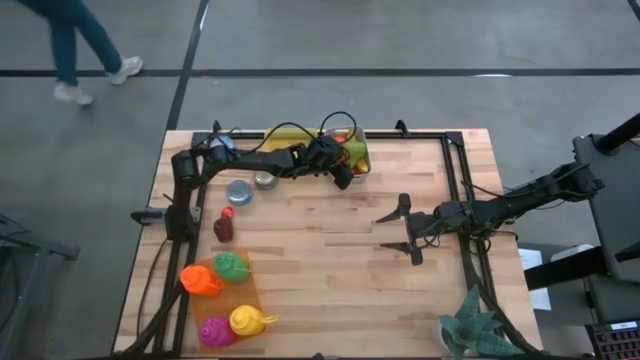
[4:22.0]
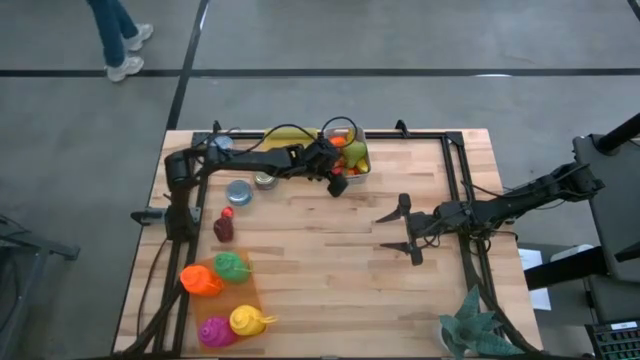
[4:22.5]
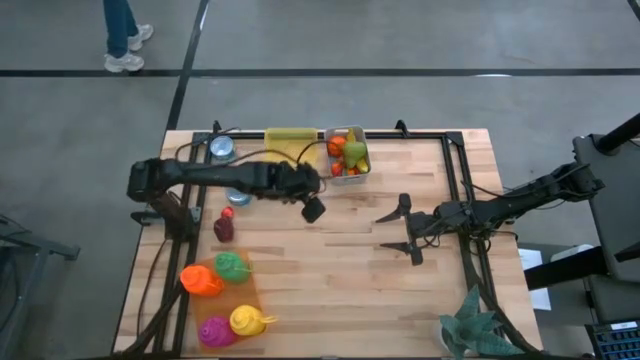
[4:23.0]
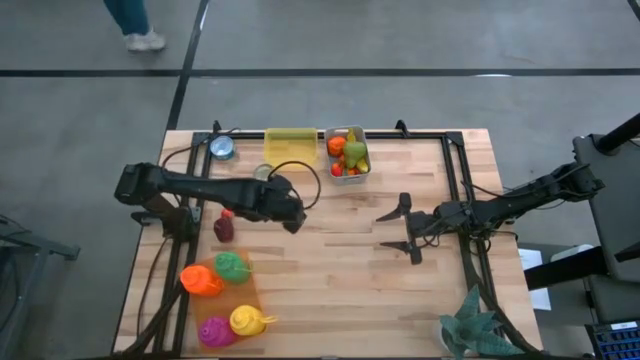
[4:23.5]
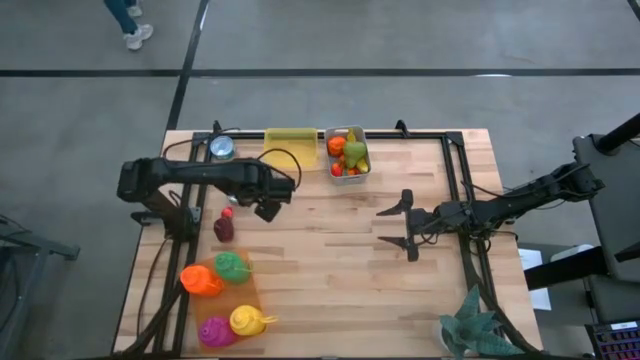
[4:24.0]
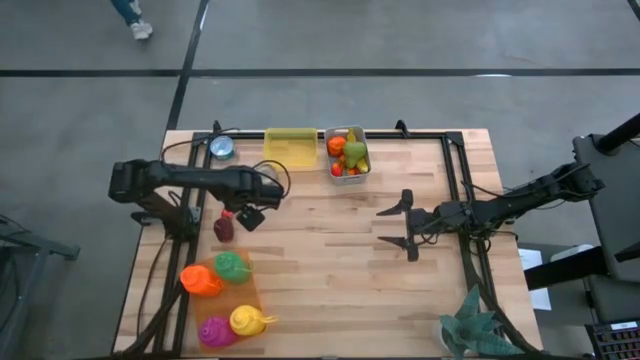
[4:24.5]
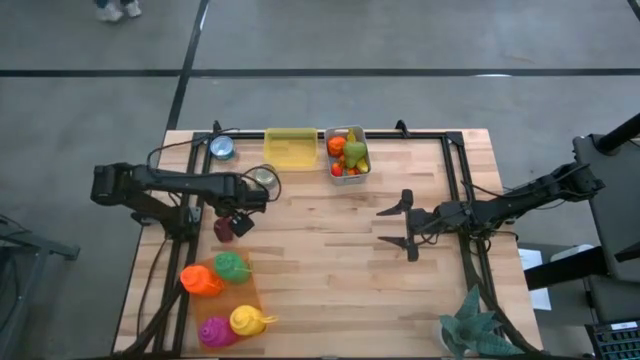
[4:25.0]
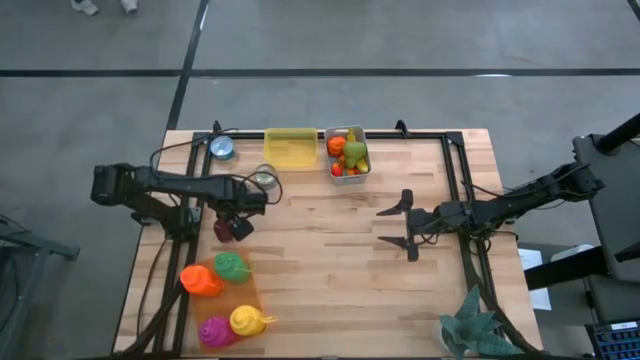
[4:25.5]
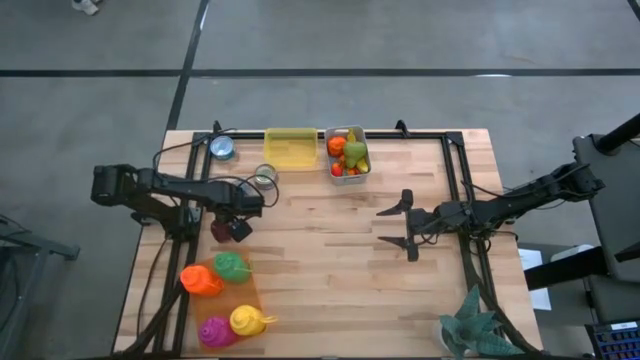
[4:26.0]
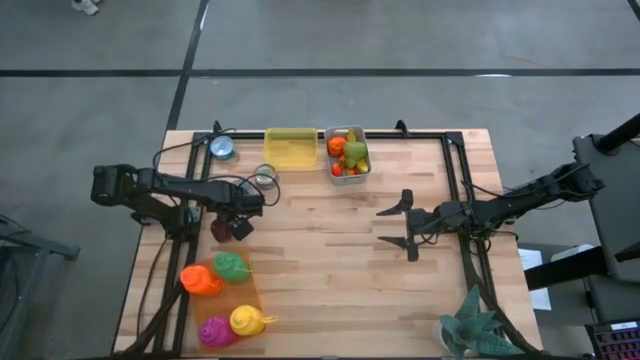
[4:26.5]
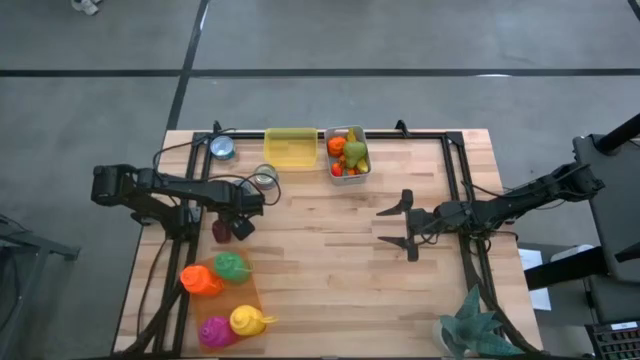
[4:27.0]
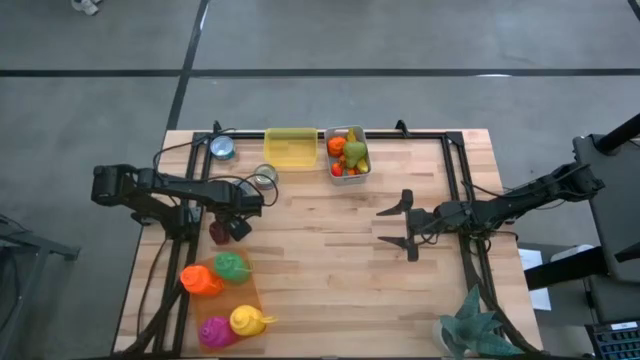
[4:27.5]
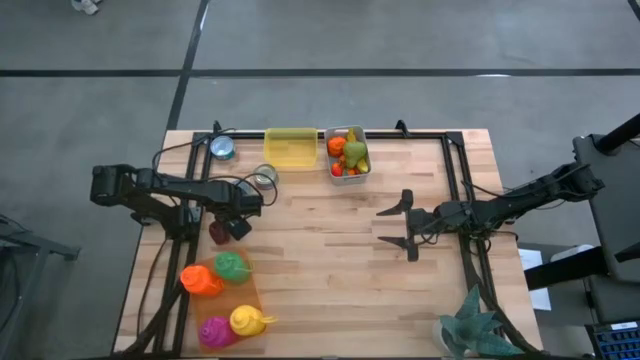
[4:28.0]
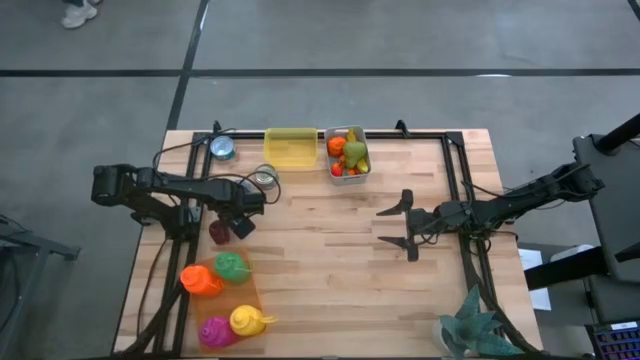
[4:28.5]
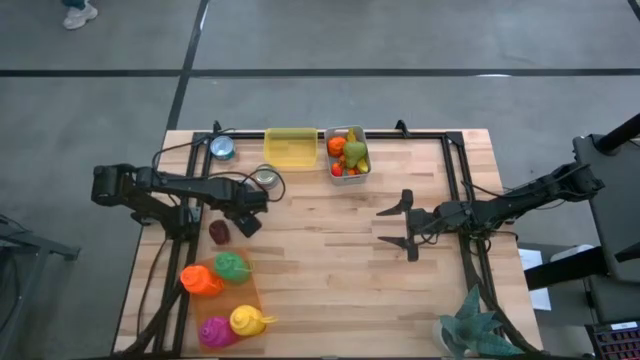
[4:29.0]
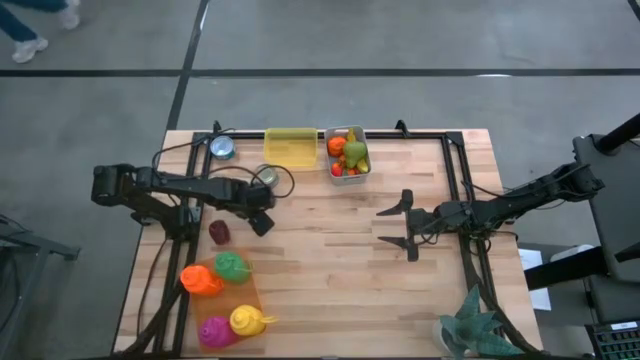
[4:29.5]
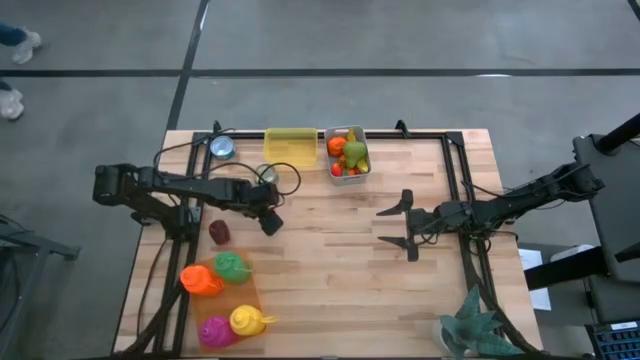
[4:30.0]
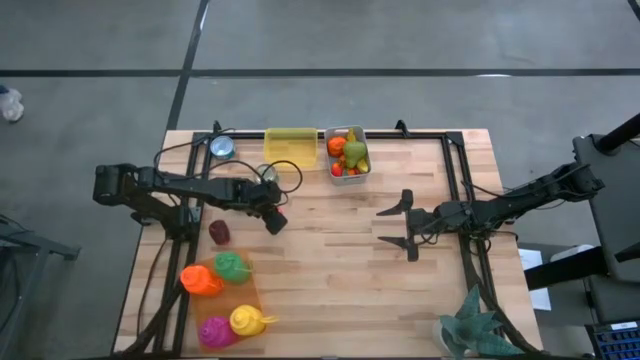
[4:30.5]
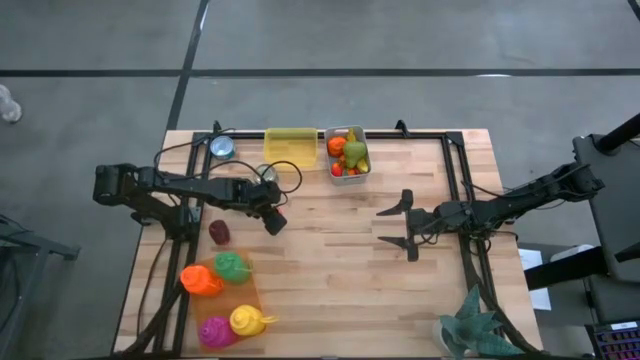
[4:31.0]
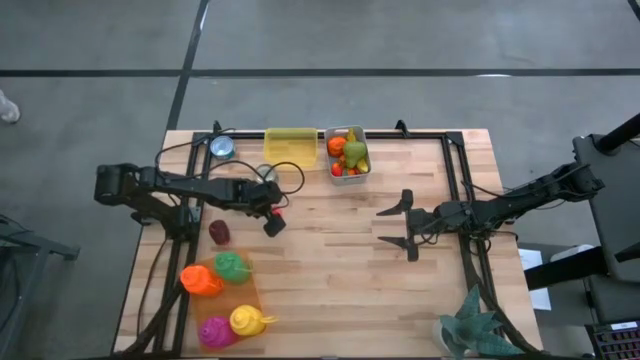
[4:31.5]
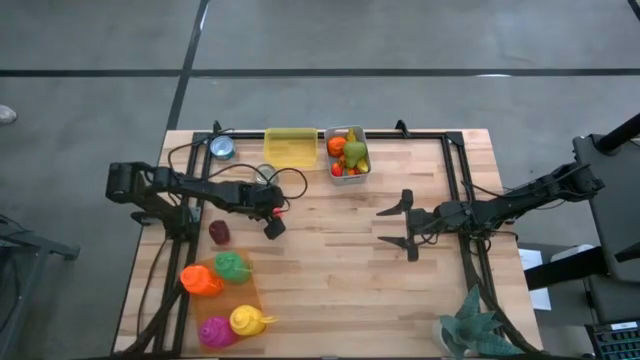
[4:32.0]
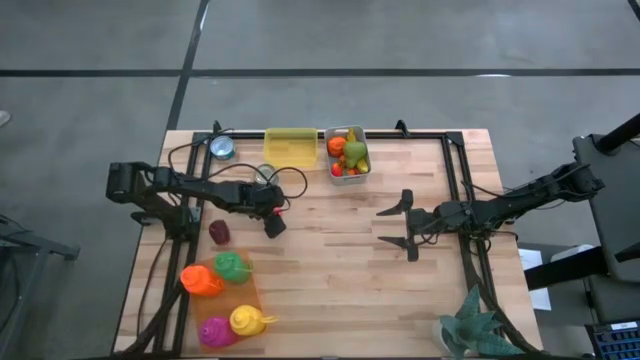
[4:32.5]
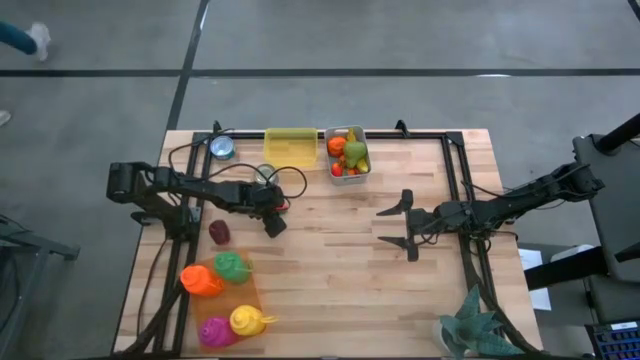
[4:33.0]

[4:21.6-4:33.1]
Task: Pick & Place Food Item
Put the red strawberry into the gray bin

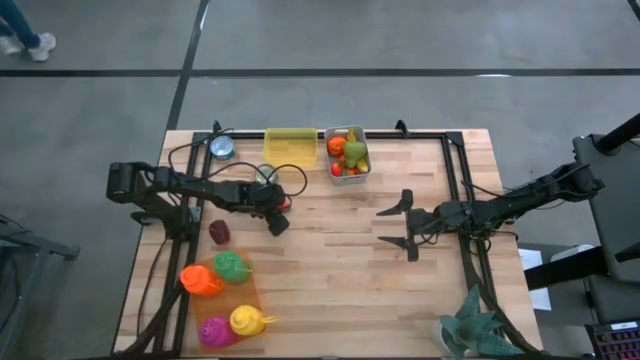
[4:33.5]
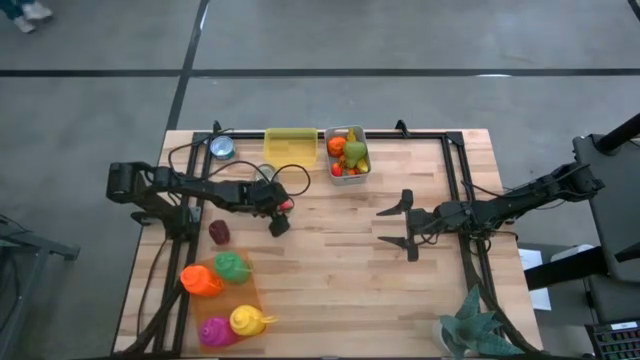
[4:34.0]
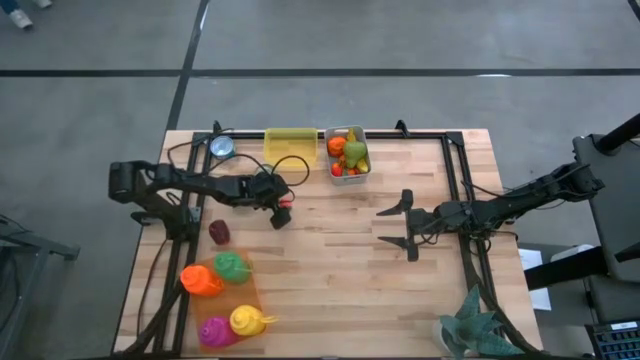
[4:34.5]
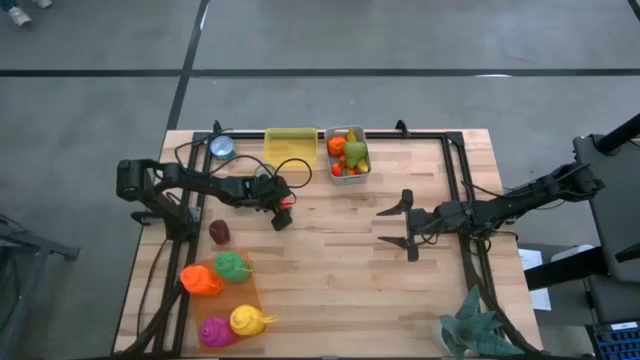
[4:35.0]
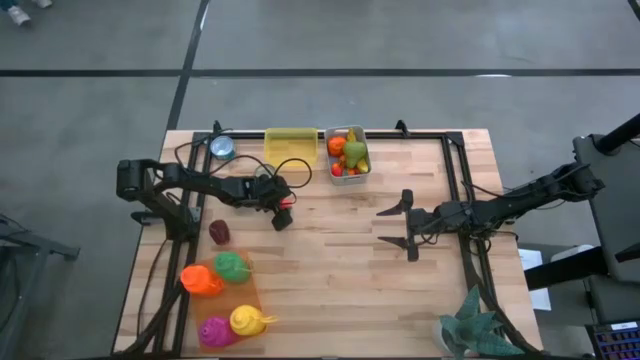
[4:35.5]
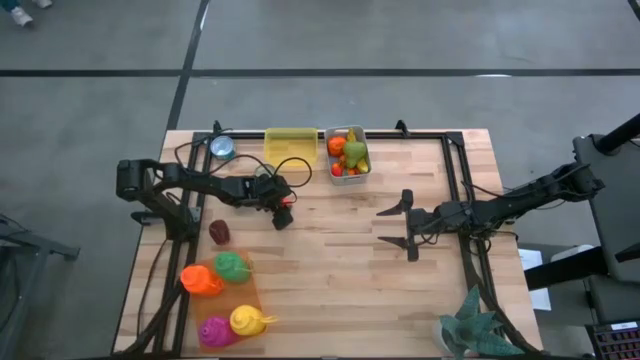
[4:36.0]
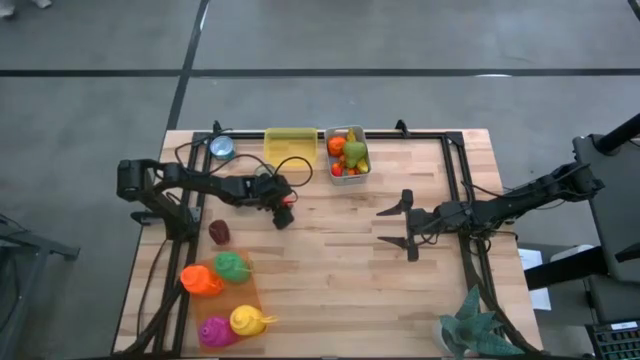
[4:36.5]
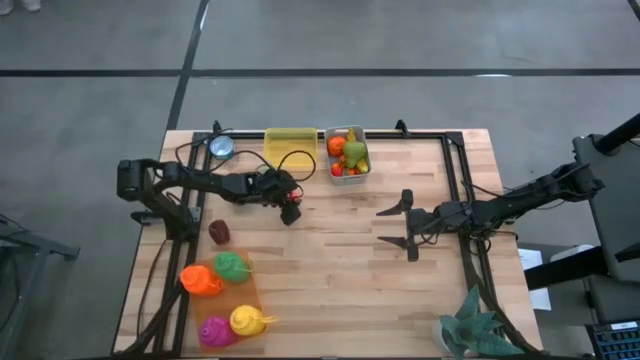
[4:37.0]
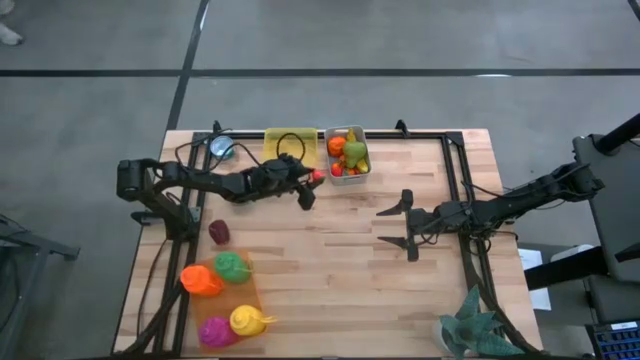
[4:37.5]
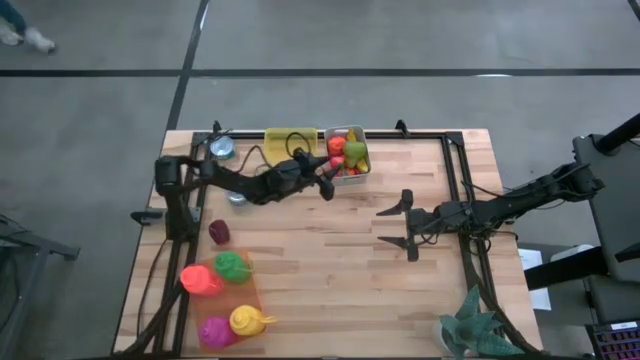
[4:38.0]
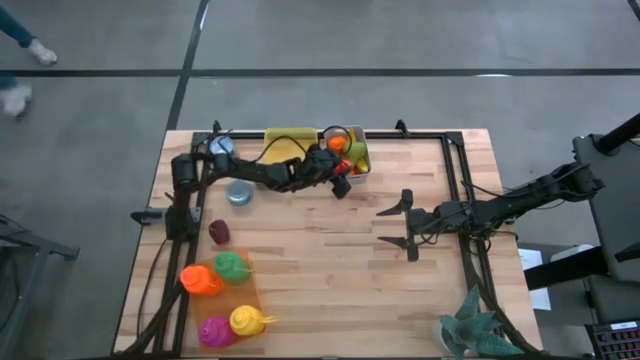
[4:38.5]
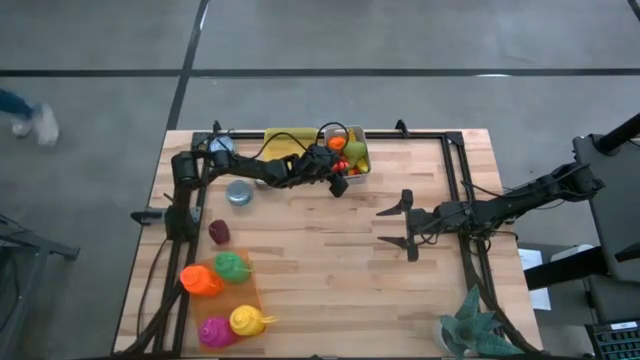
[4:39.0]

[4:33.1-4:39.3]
Put the red strawberry into the gray bin

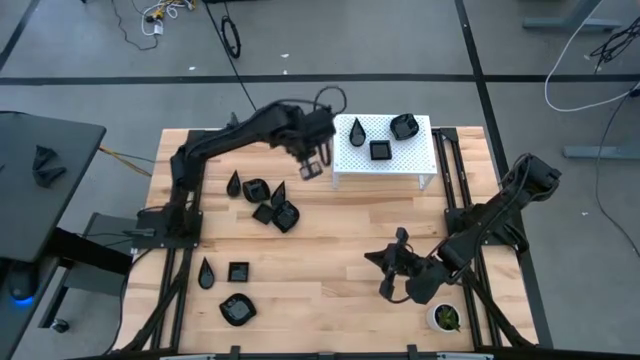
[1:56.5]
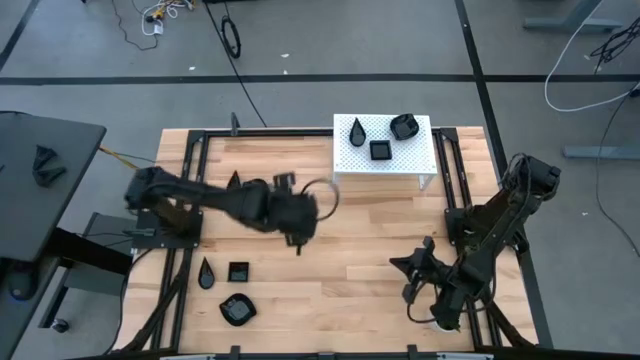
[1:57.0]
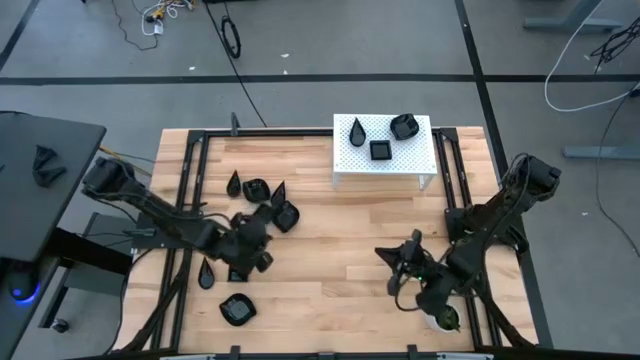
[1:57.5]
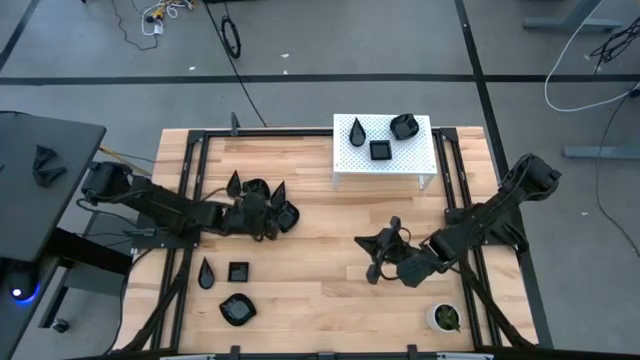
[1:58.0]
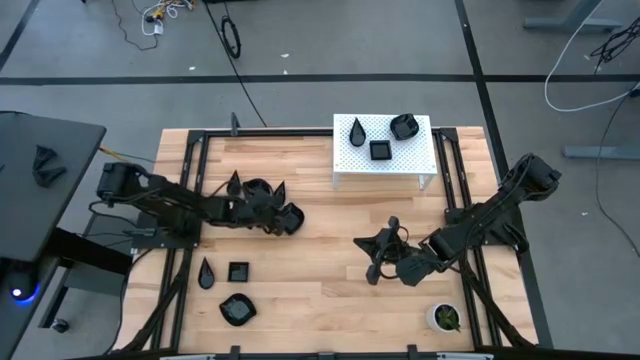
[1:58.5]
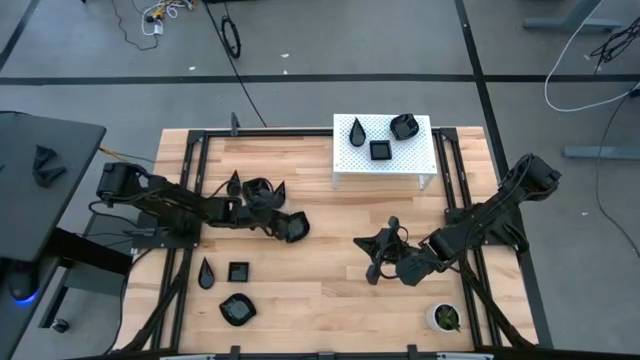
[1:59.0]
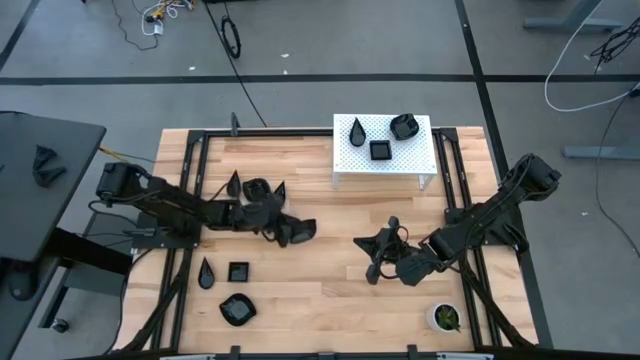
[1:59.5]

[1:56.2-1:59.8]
Task: Pick & Place Mini shaped plates
Stack the black leaf shaped plate on the black leaf shaped plate on the shelf
